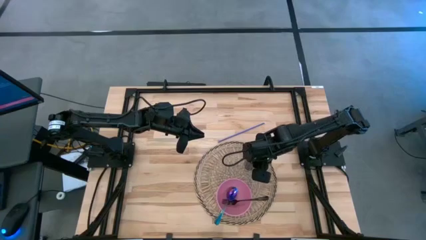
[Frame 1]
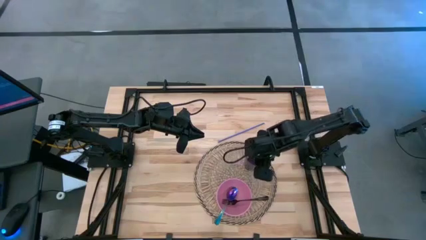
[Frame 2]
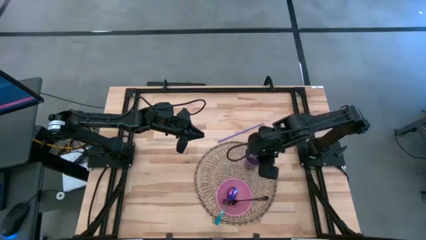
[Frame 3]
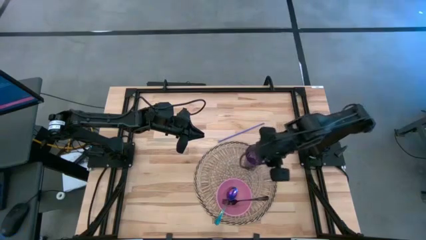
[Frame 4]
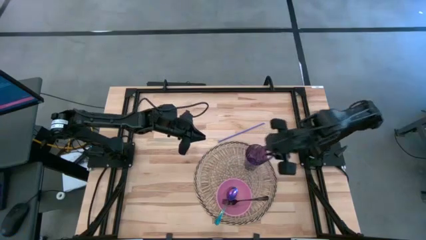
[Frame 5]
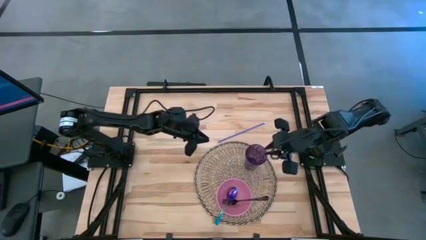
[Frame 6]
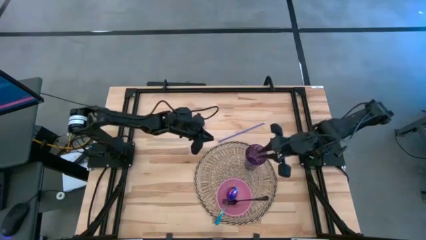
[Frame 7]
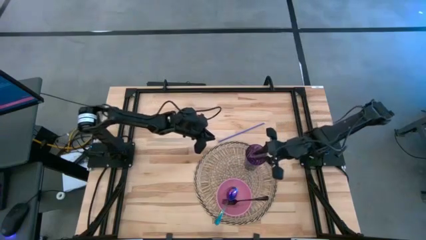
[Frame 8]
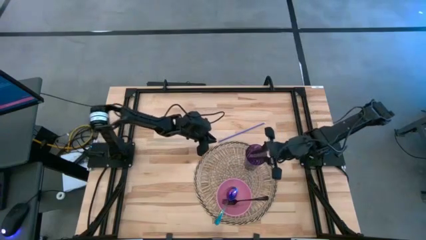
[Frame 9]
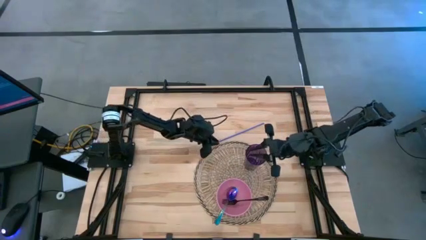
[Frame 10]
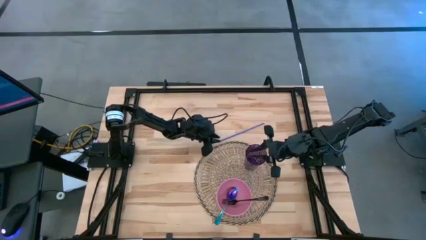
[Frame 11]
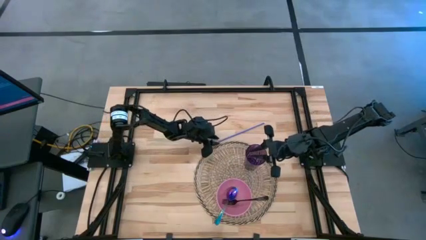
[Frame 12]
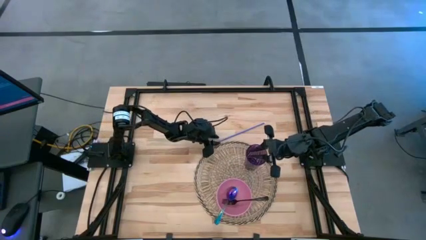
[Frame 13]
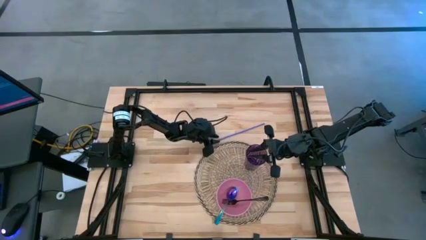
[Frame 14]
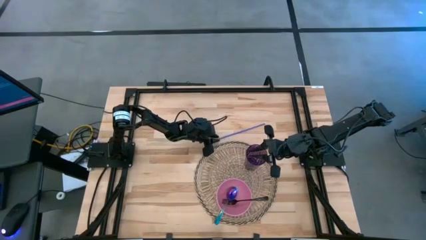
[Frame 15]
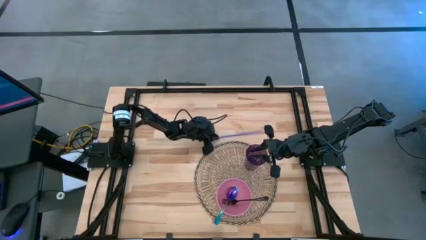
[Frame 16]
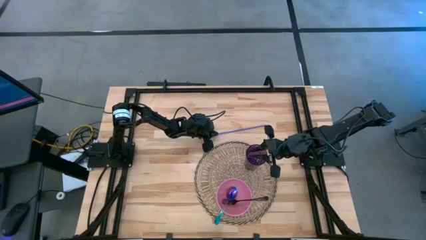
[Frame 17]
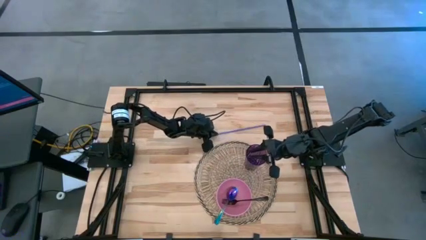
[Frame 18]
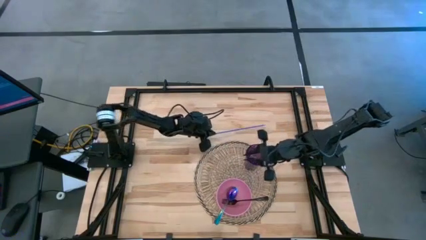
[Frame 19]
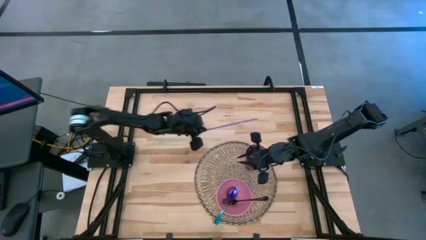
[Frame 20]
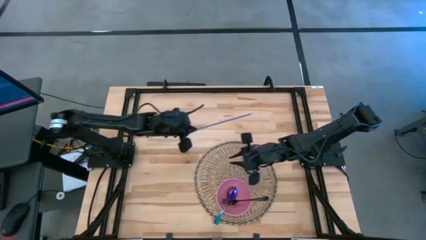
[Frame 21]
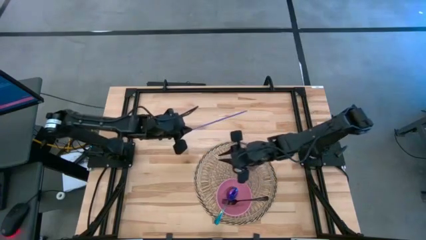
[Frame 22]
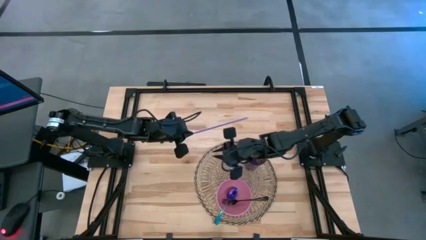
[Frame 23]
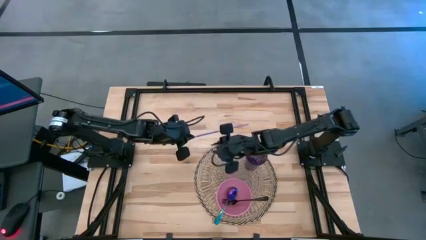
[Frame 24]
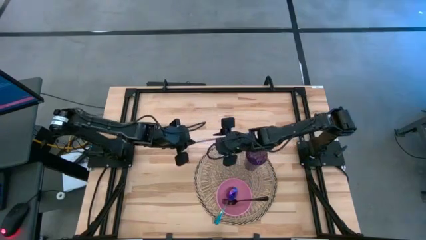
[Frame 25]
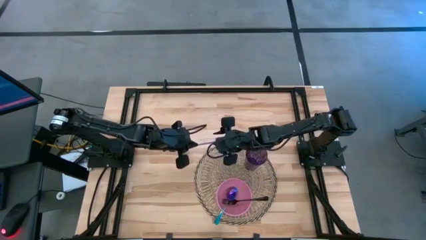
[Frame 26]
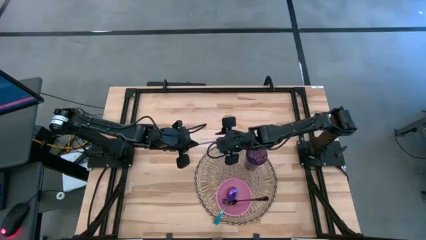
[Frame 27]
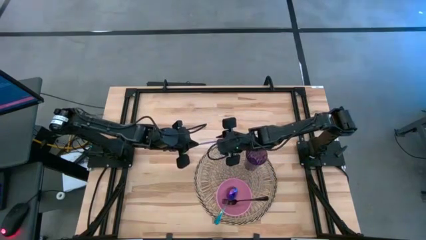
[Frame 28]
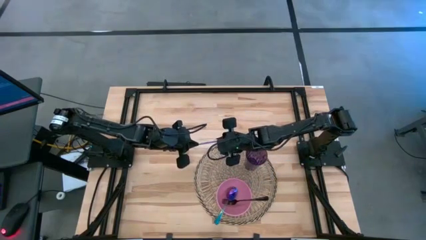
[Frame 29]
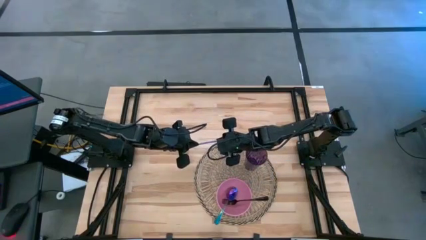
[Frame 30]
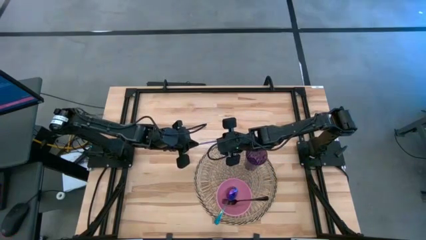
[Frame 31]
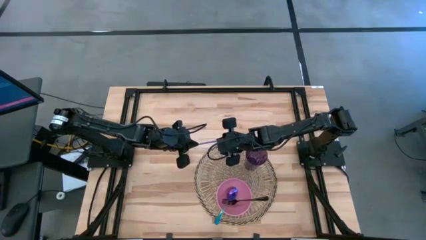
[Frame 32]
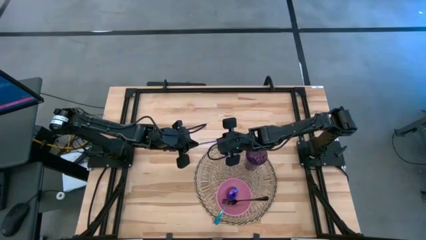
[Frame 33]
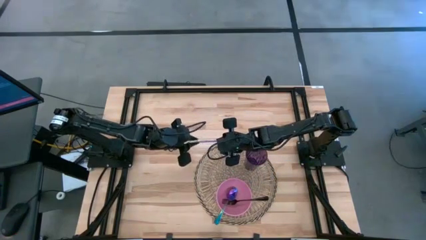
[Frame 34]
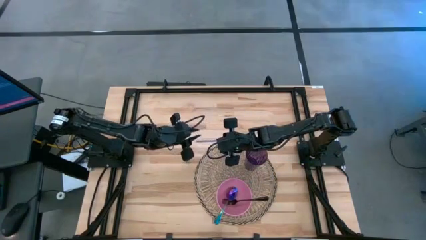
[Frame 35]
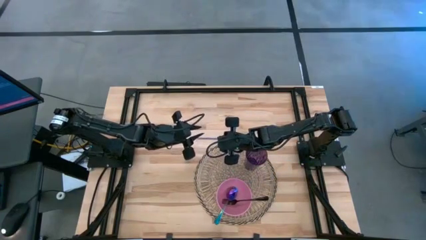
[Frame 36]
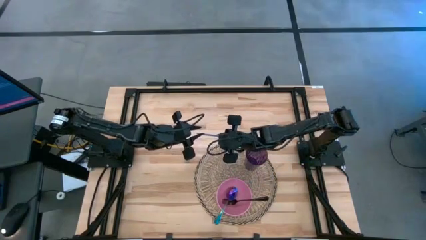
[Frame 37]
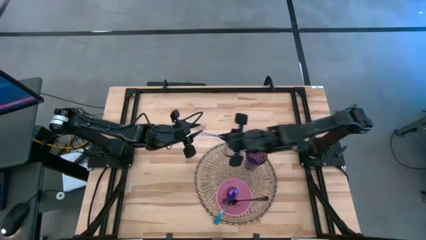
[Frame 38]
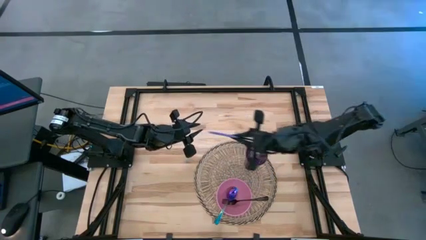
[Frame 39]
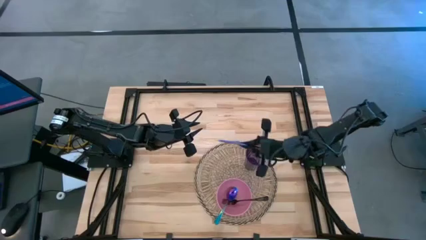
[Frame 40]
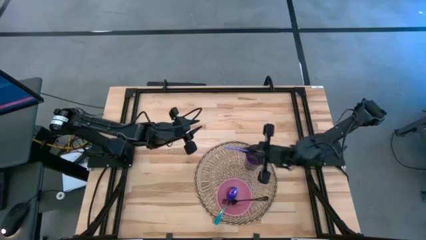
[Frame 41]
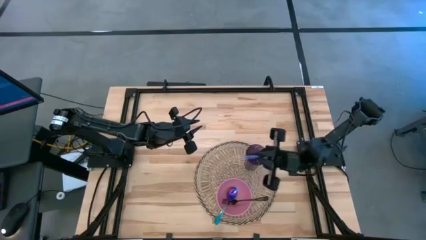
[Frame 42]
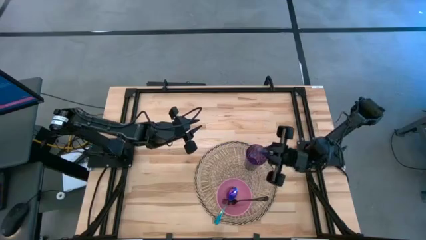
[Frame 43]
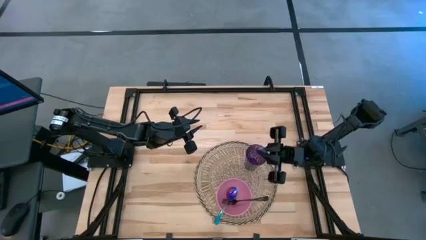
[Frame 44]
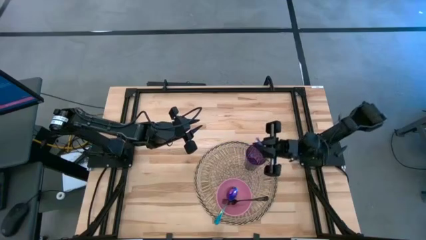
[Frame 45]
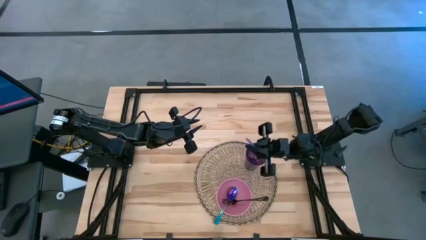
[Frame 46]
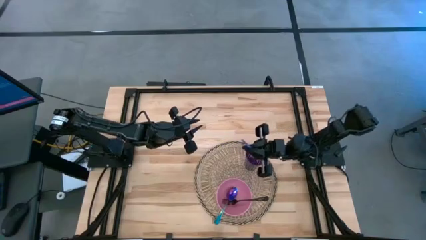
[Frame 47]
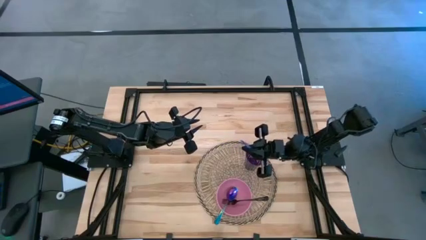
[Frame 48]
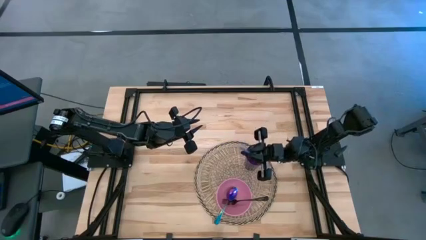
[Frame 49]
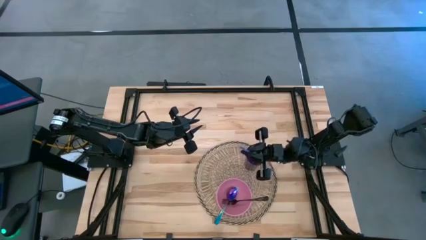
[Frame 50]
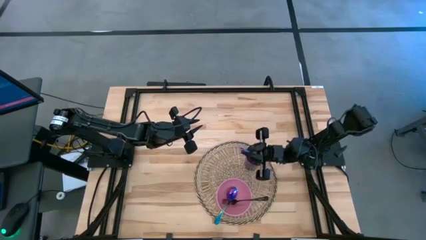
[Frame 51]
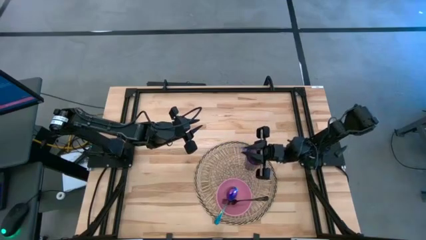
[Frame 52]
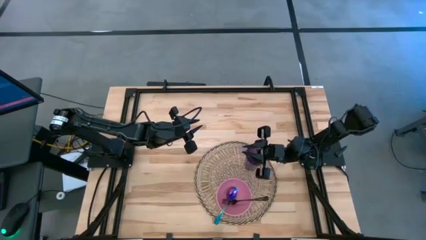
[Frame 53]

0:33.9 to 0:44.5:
Task: Pick & Place Utensil
Put the blue straw into the violet cup on the woven mat

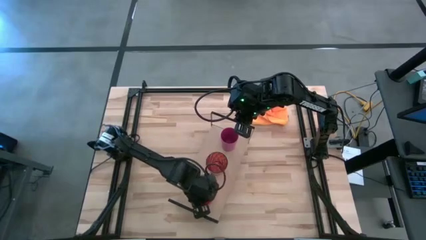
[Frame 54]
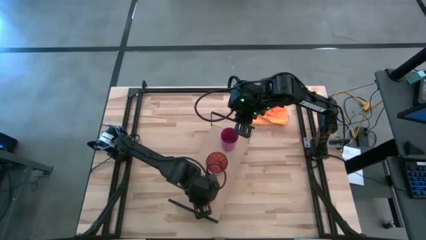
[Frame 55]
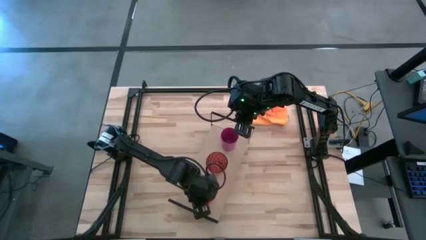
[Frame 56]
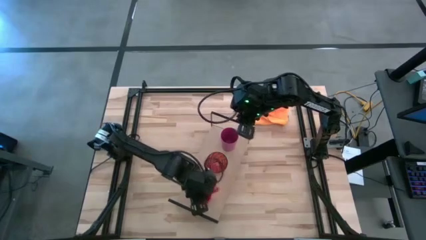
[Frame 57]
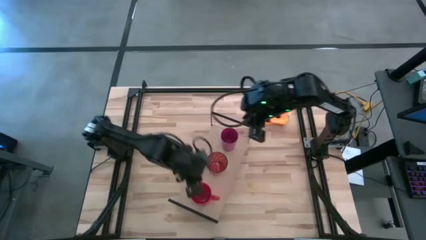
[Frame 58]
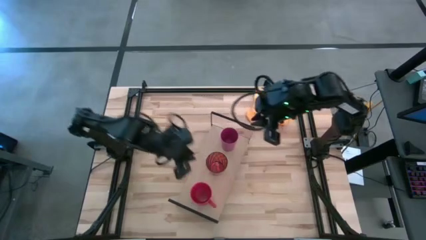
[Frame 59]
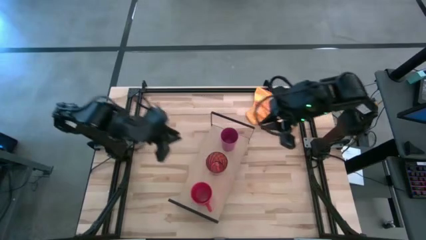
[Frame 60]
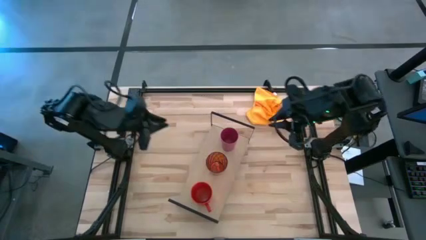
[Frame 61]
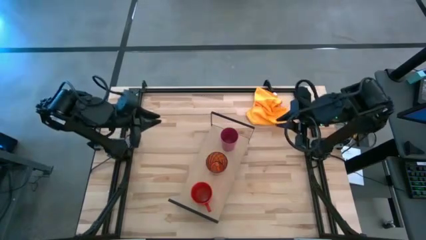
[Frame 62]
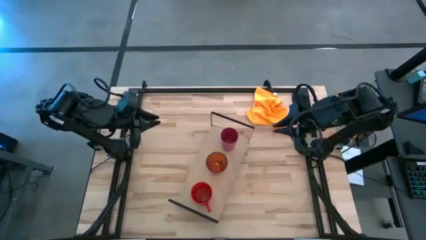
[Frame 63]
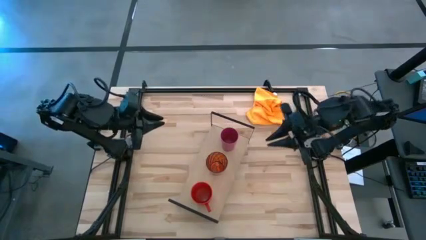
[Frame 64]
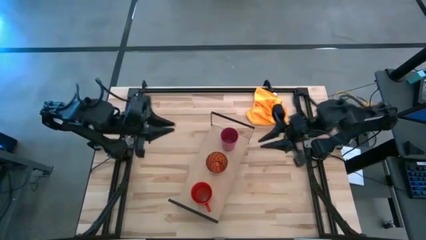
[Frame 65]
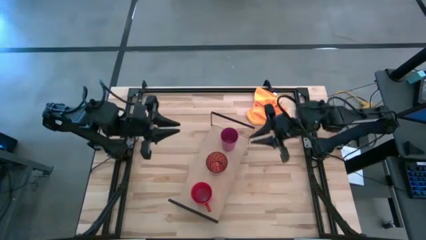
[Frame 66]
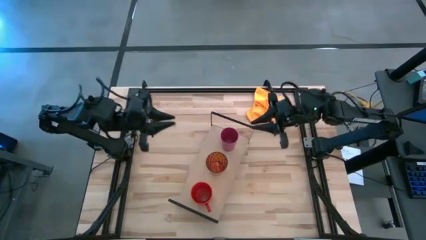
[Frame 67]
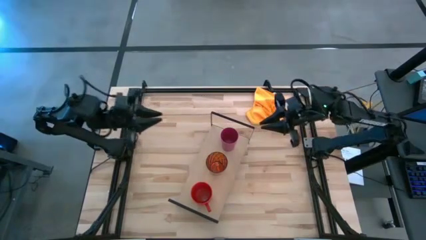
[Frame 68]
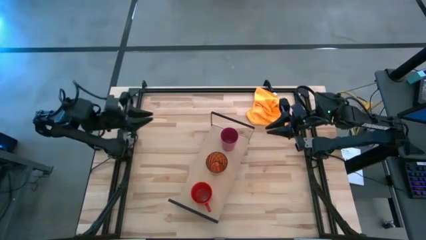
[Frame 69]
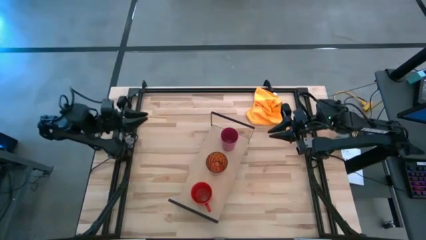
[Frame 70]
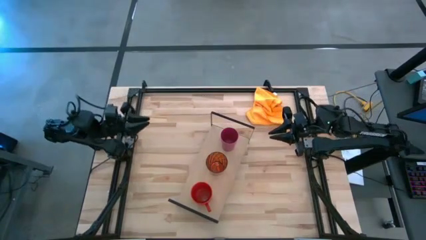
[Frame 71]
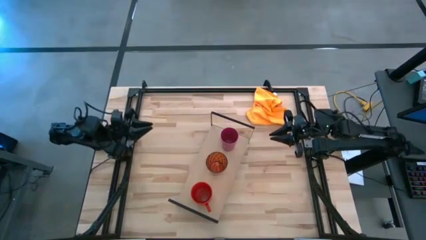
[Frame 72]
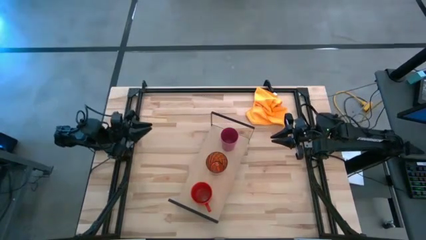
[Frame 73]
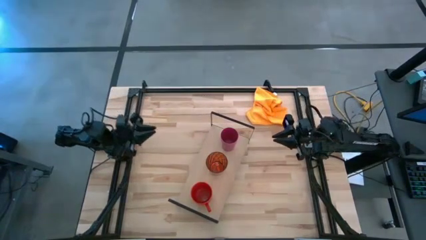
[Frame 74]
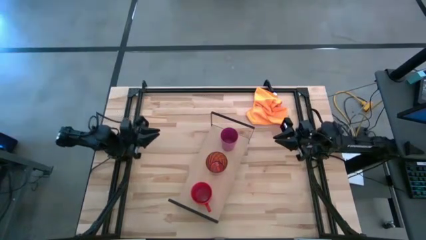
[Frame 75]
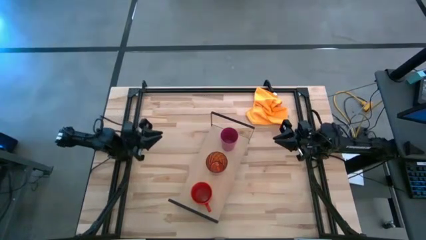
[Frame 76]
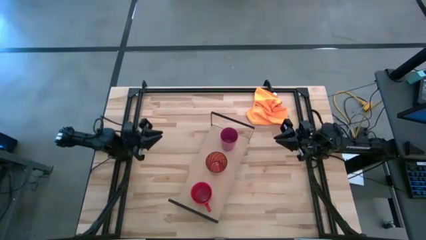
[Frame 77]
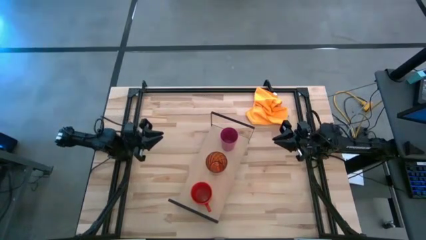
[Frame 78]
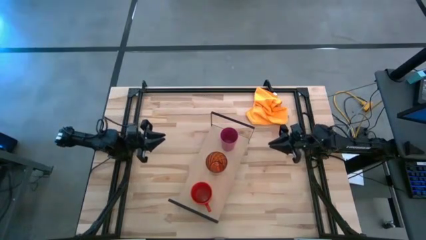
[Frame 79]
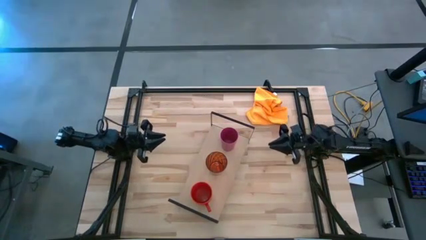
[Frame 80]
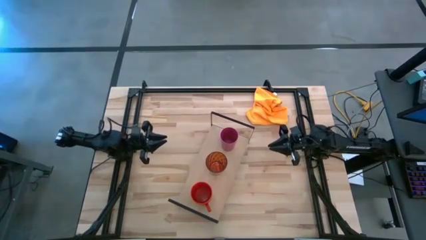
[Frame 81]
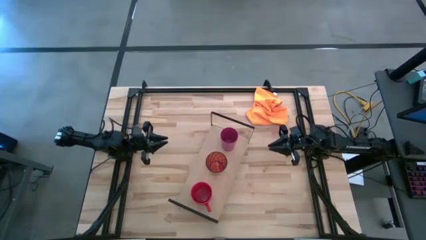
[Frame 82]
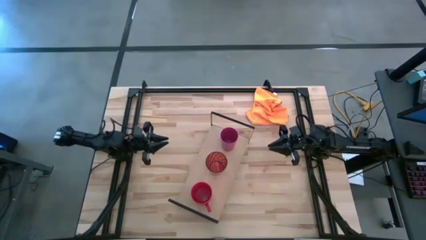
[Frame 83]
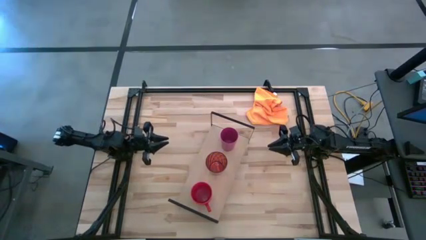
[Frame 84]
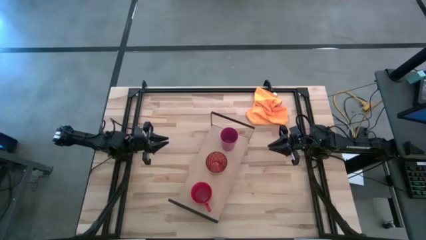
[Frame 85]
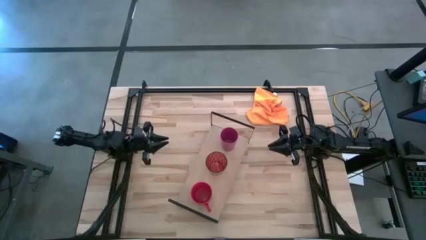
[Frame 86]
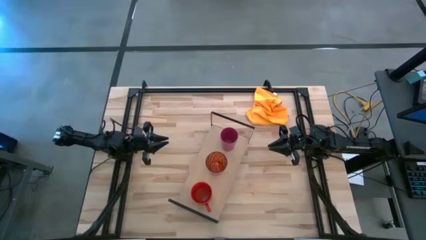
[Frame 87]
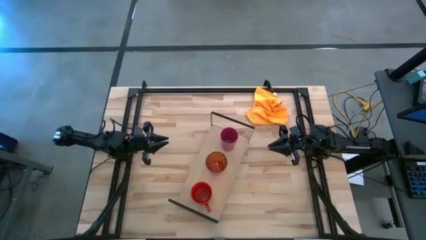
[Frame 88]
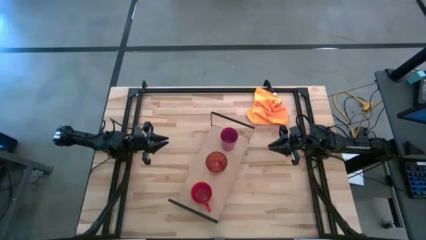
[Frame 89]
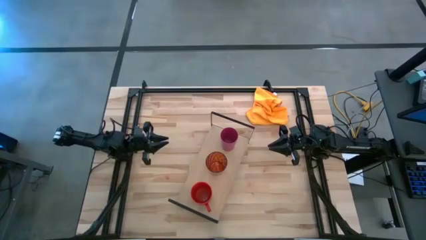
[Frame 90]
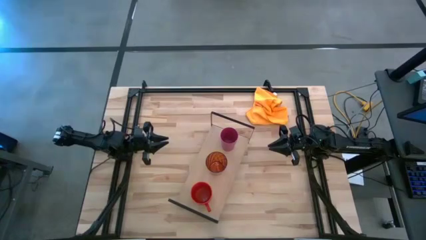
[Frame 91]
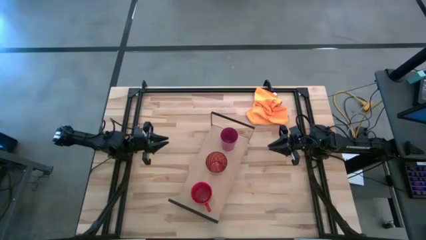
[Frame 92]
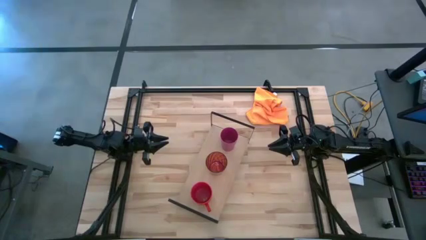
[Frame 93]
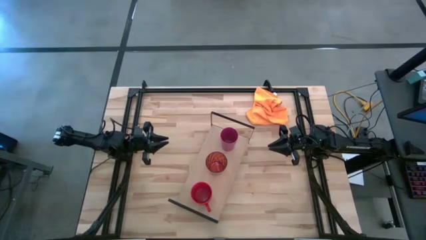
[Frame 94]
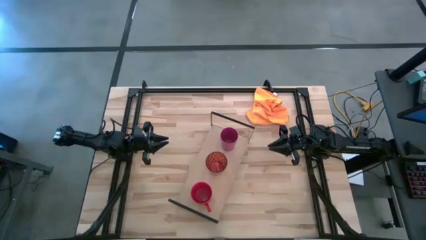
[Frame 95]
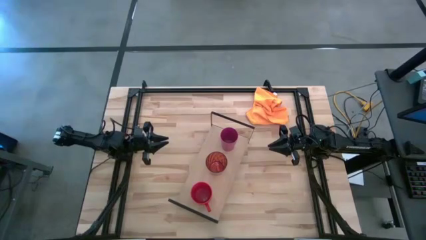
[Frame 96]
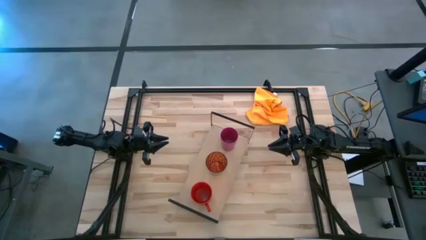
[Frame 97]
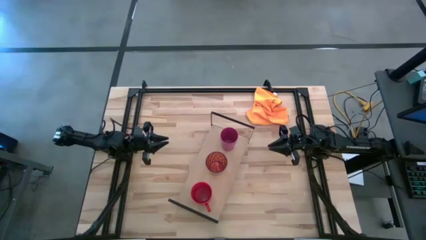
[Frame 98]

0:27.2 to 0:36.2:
Task: Stack small to large cups/mugs on shelf
Return to Home Position
